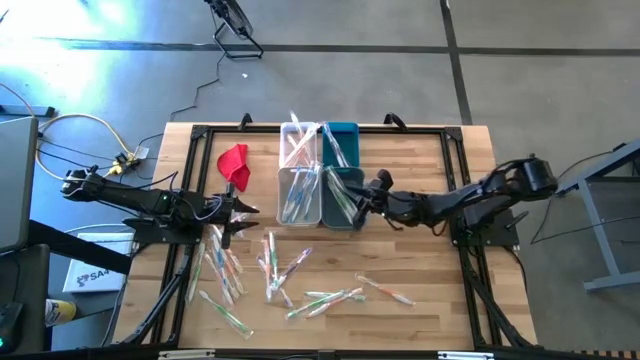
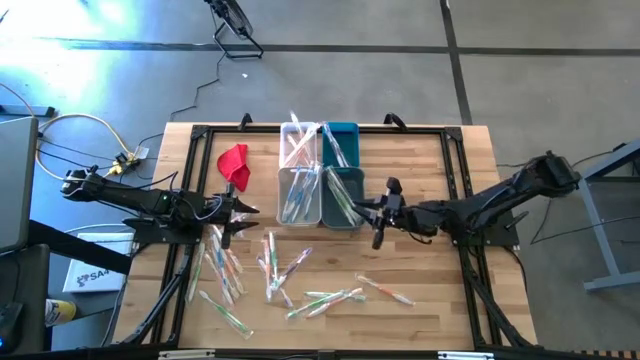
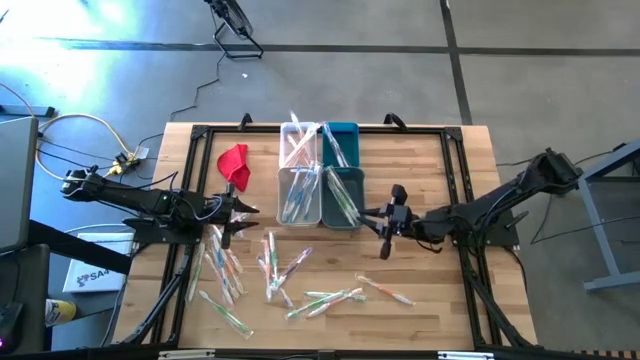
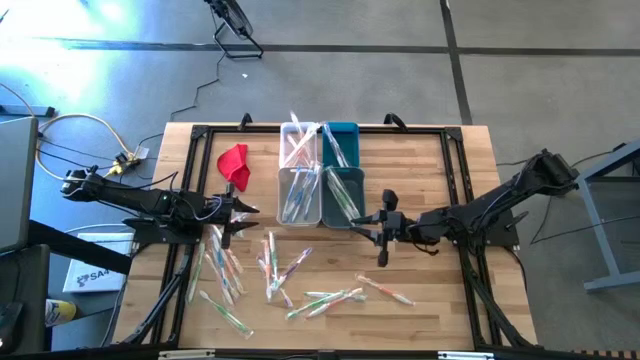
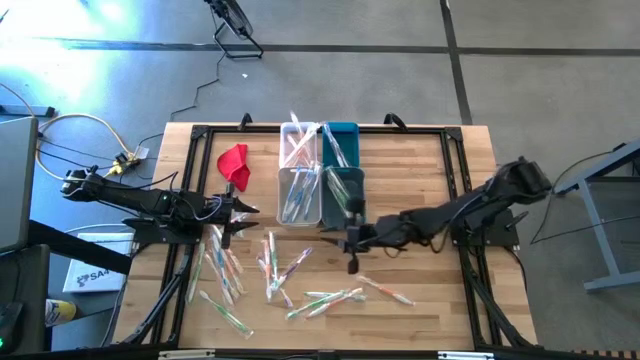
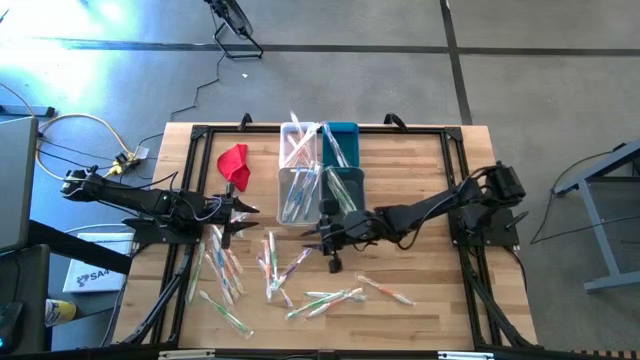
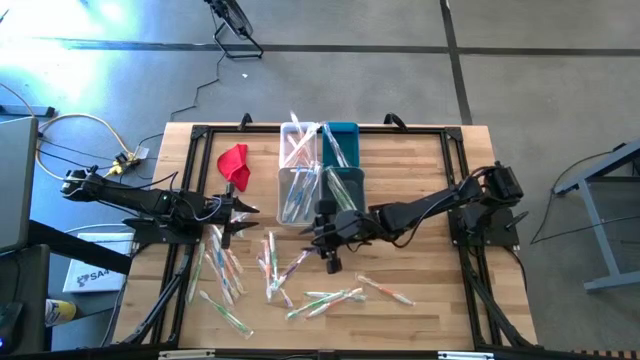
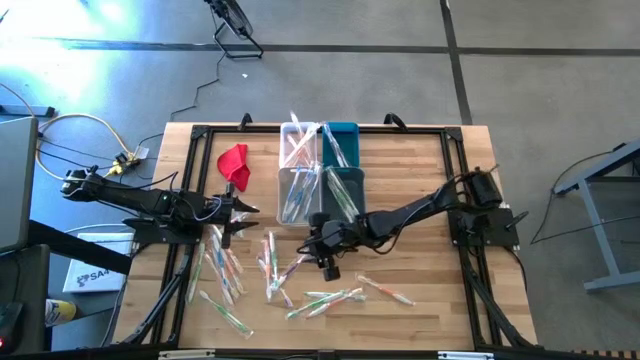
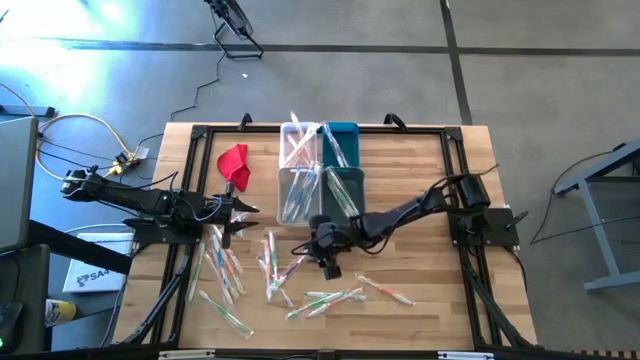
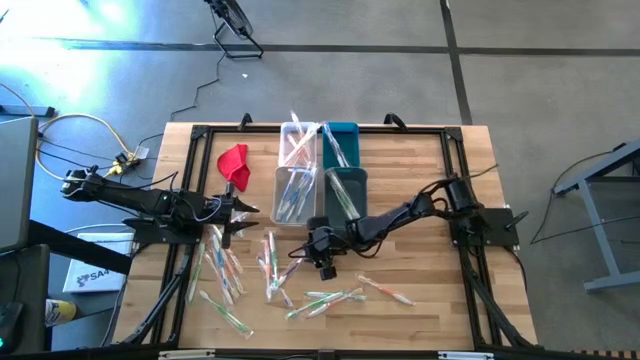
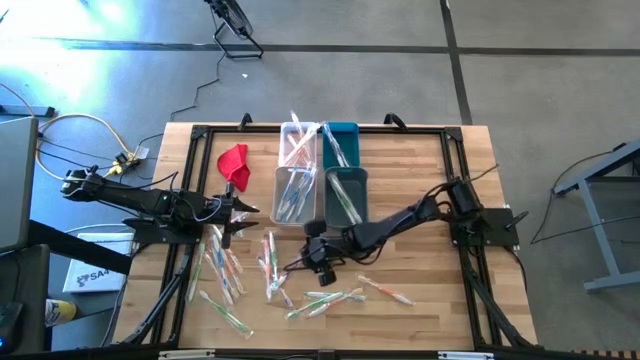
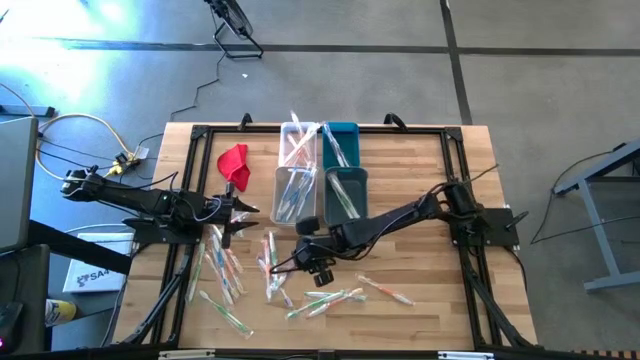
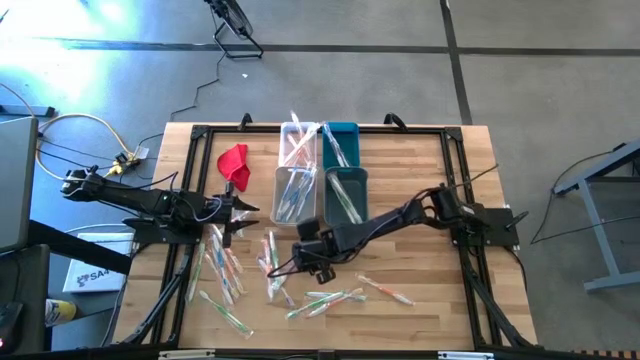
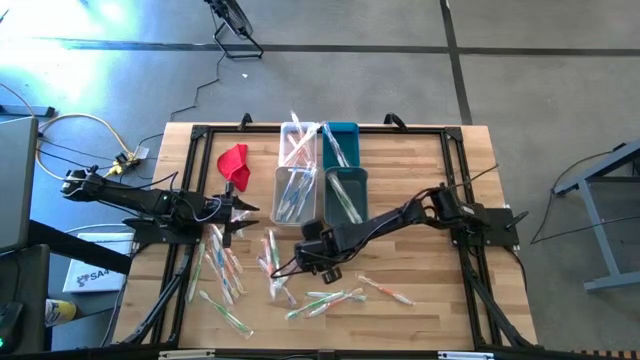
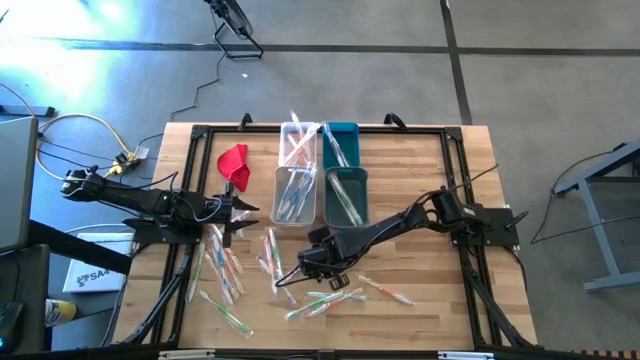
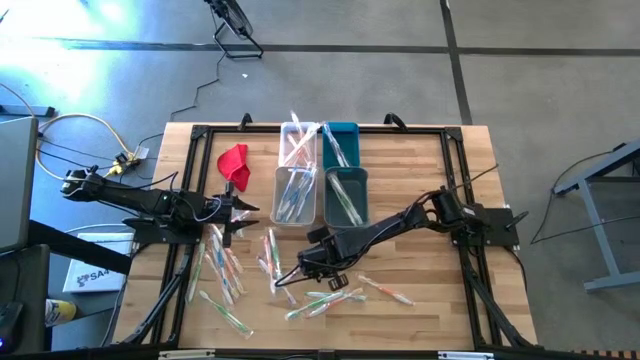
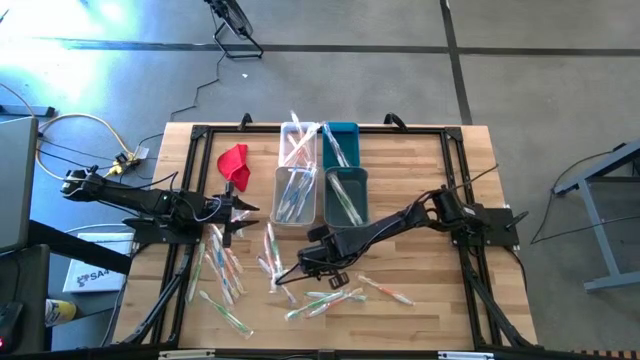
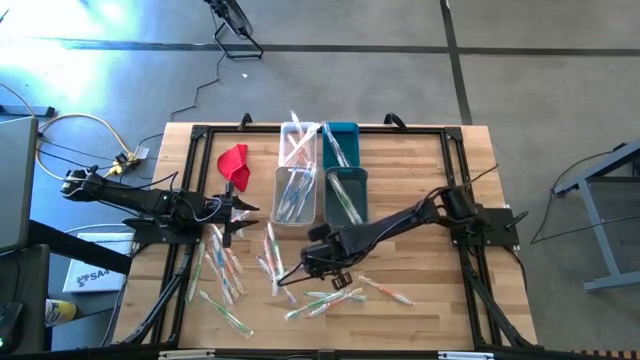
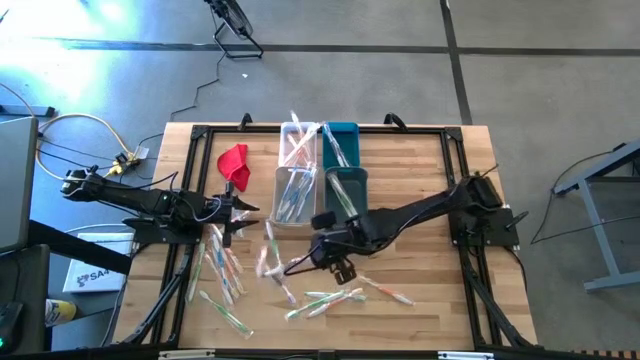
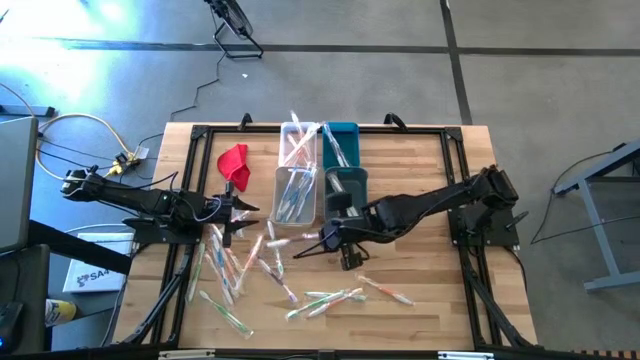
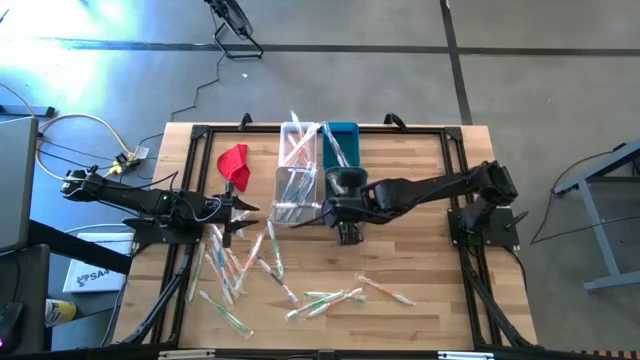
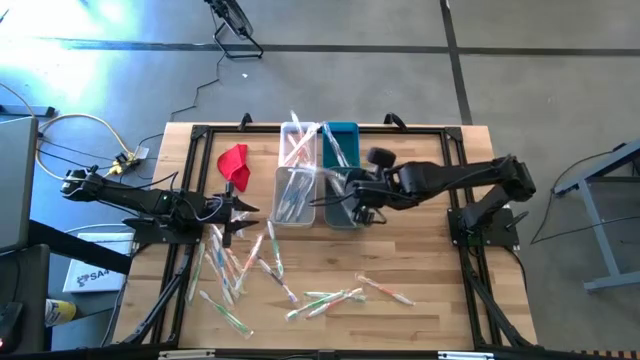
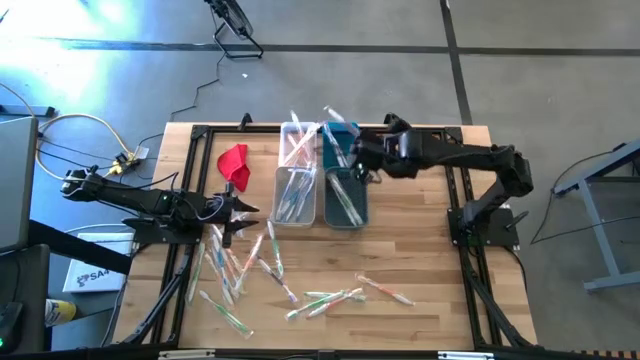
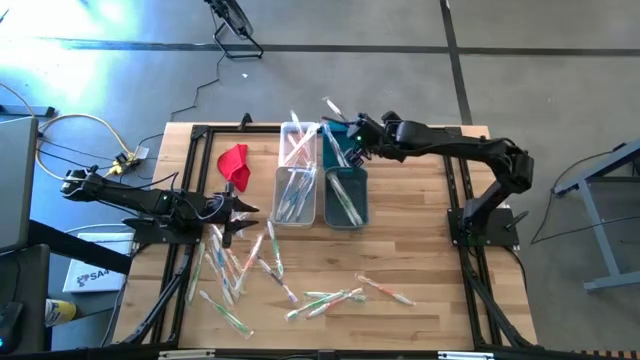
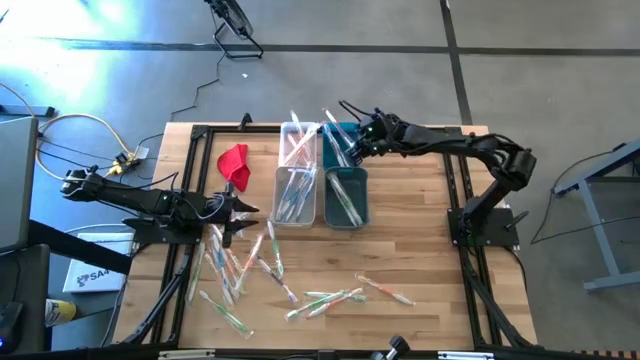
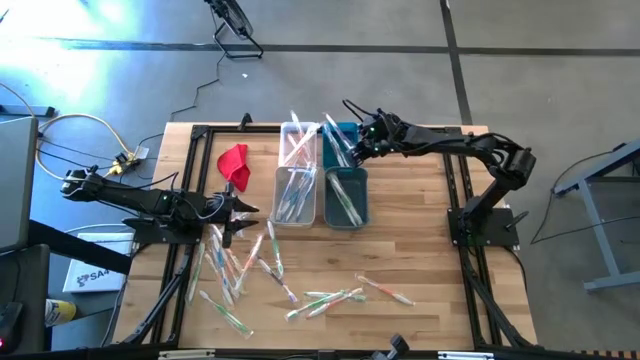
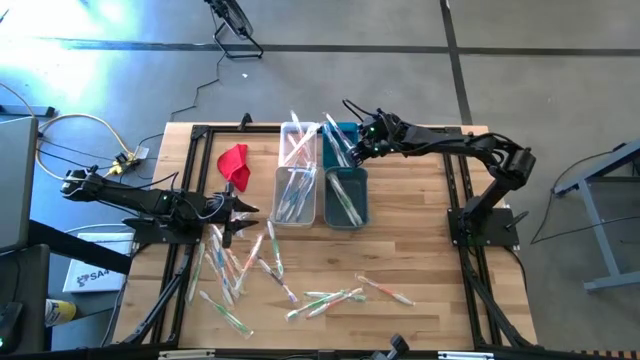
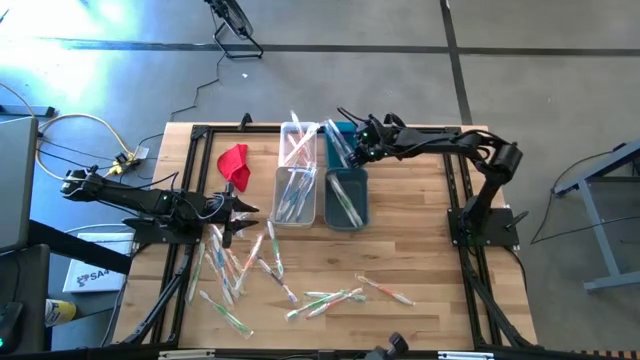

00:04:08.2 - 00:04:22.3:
Task: Pick & Place Toothbrushes
Put the violet toothbrush into the light blue bin
